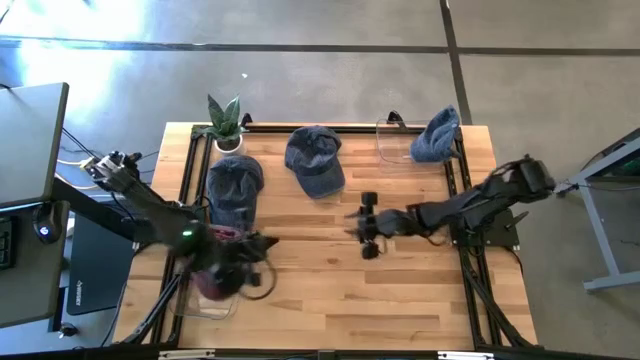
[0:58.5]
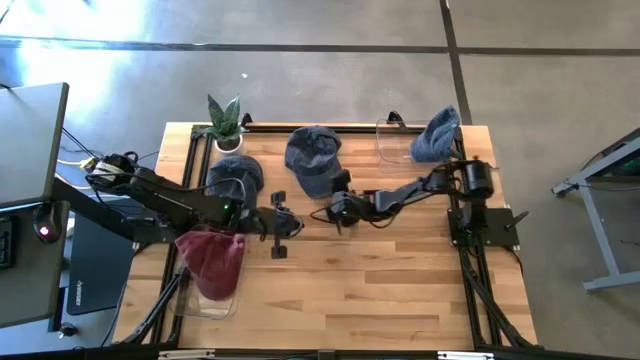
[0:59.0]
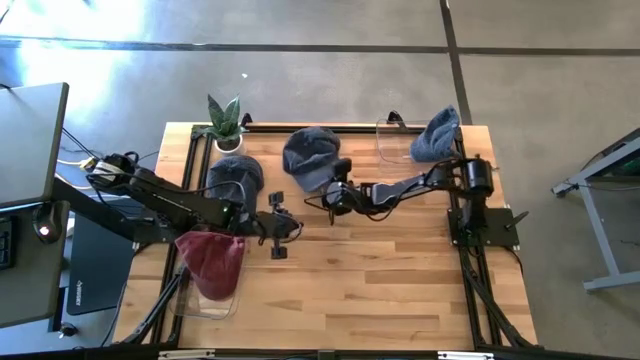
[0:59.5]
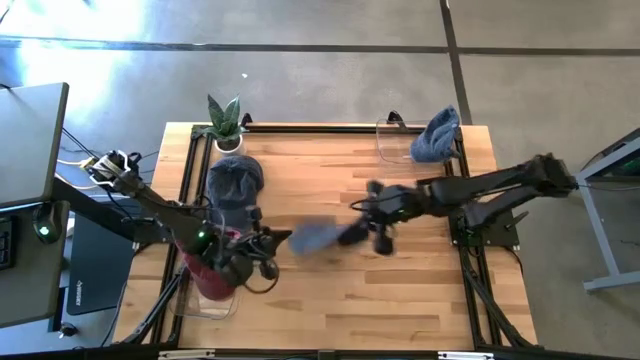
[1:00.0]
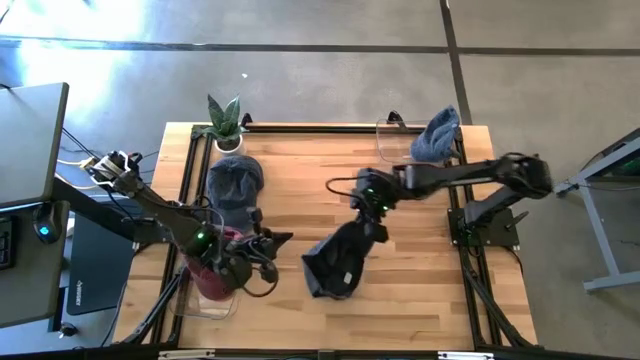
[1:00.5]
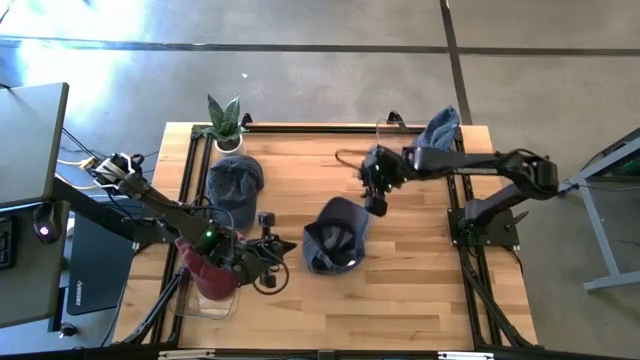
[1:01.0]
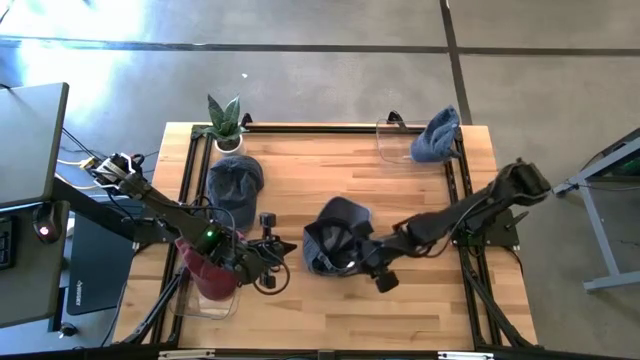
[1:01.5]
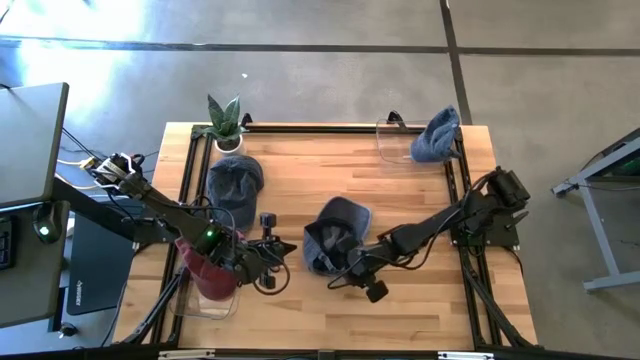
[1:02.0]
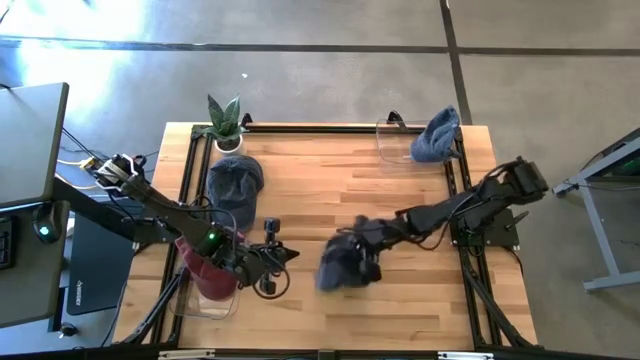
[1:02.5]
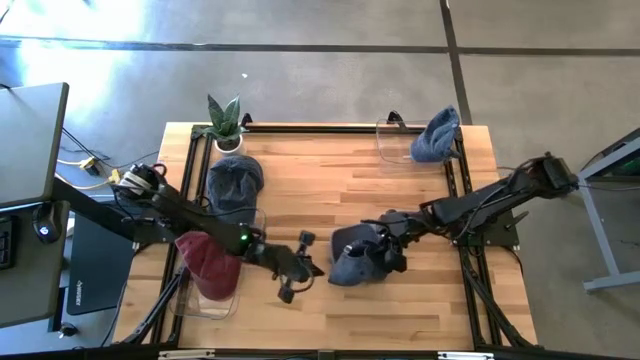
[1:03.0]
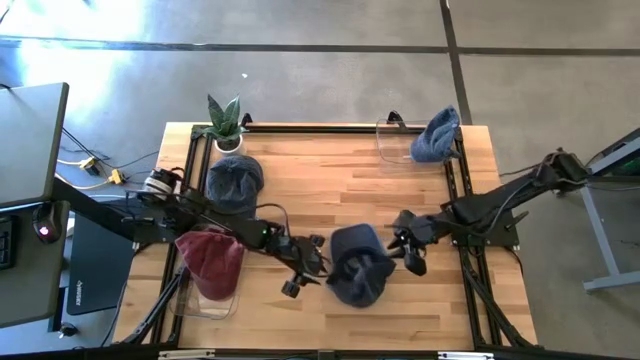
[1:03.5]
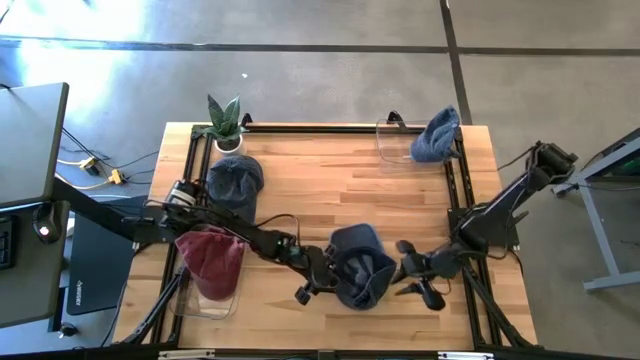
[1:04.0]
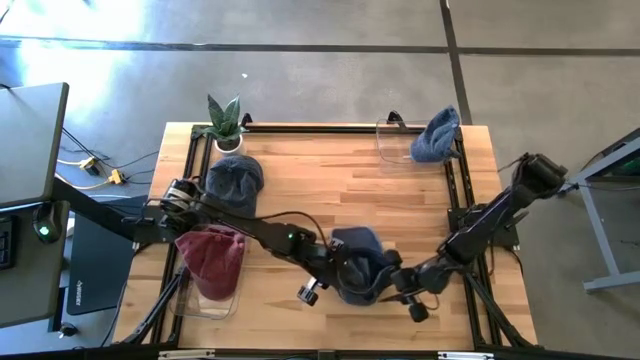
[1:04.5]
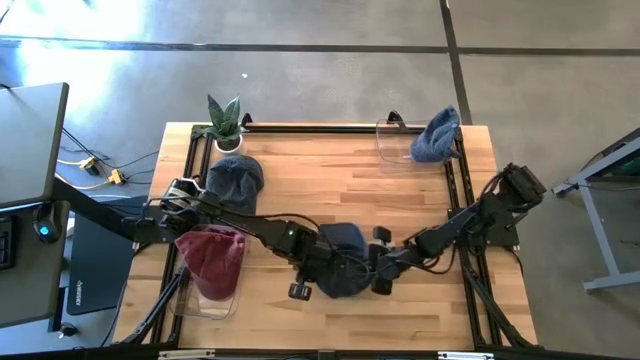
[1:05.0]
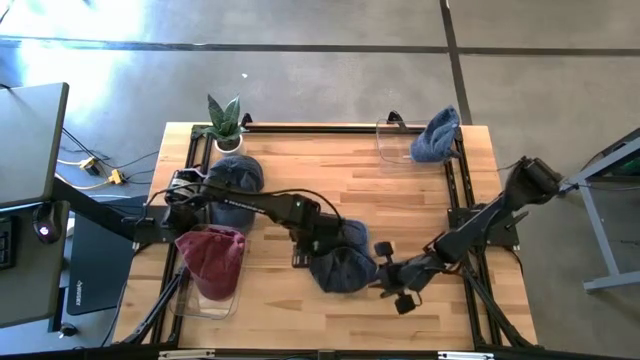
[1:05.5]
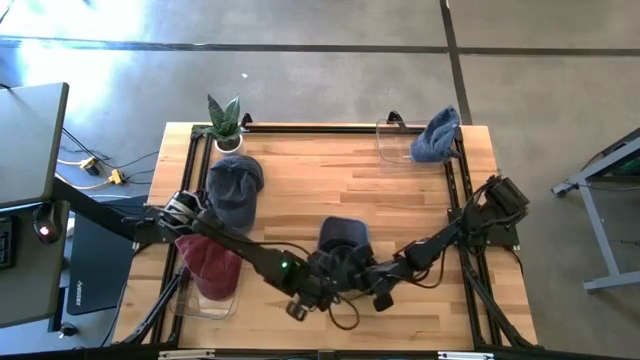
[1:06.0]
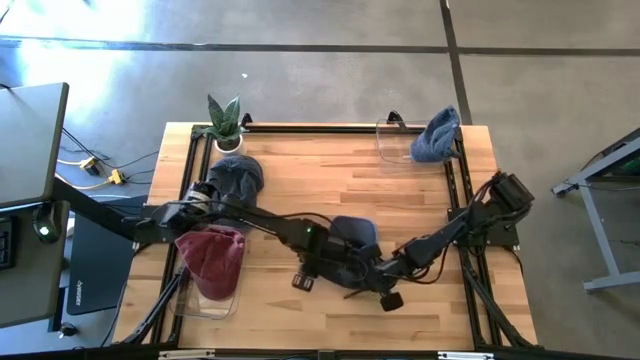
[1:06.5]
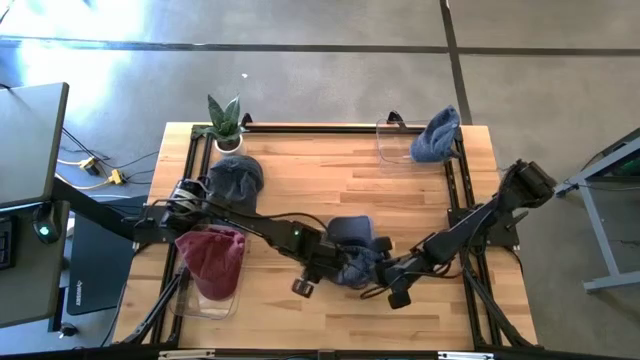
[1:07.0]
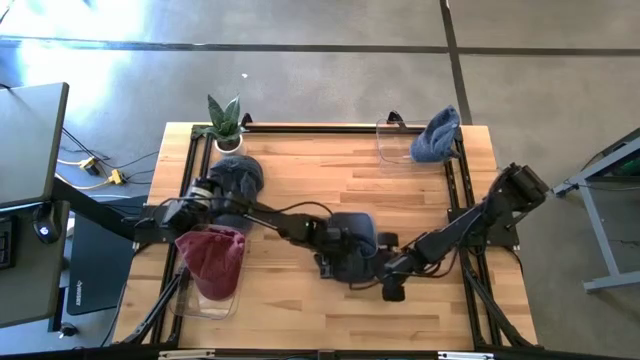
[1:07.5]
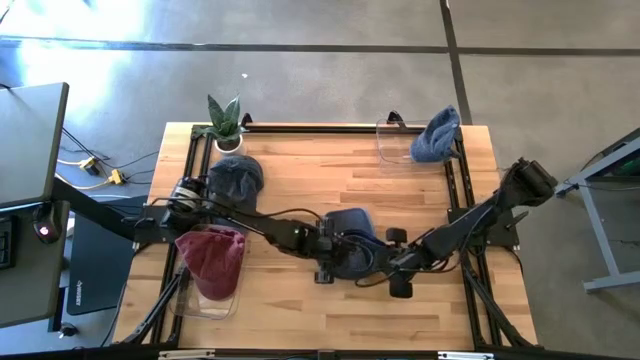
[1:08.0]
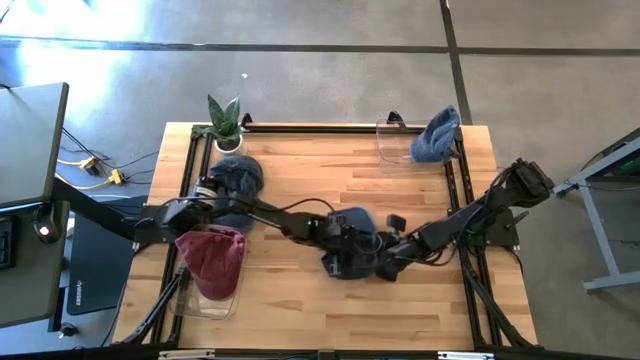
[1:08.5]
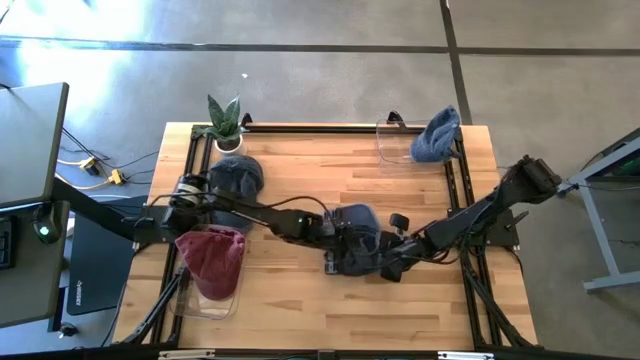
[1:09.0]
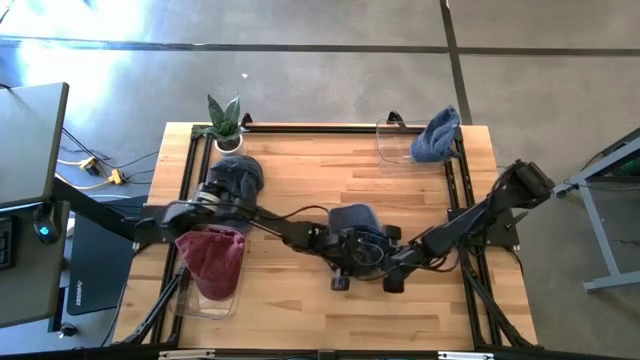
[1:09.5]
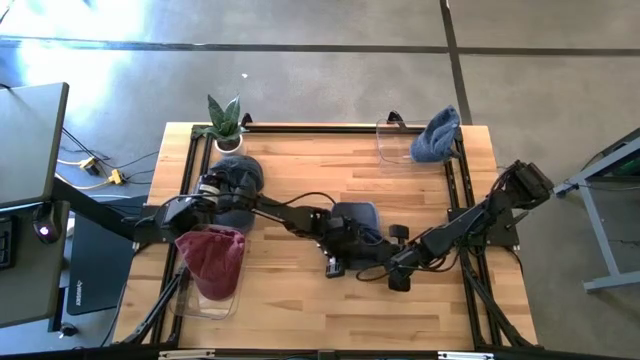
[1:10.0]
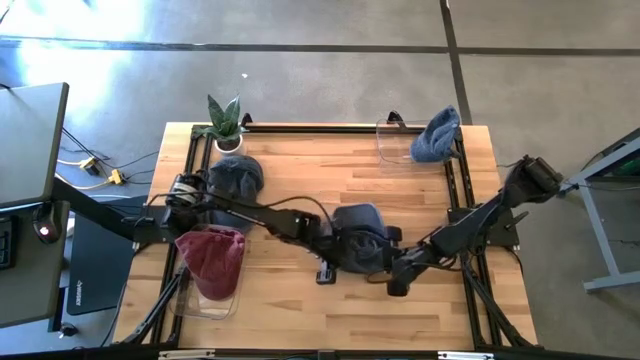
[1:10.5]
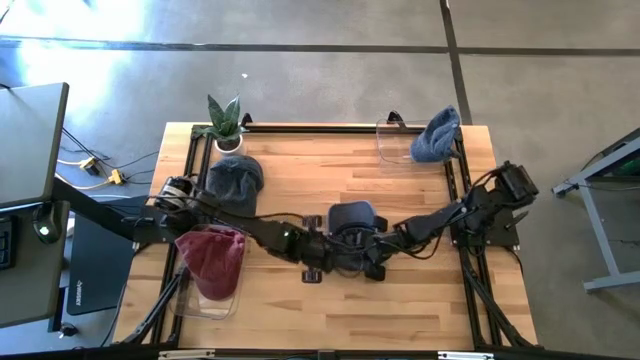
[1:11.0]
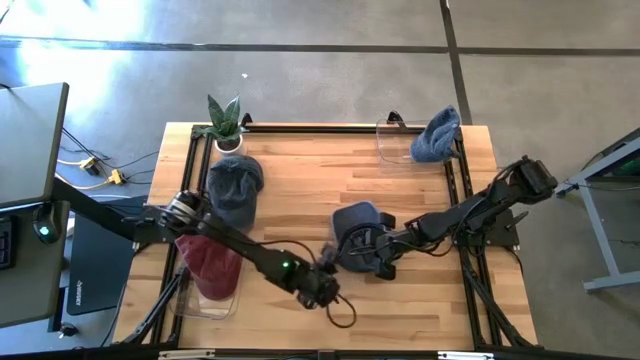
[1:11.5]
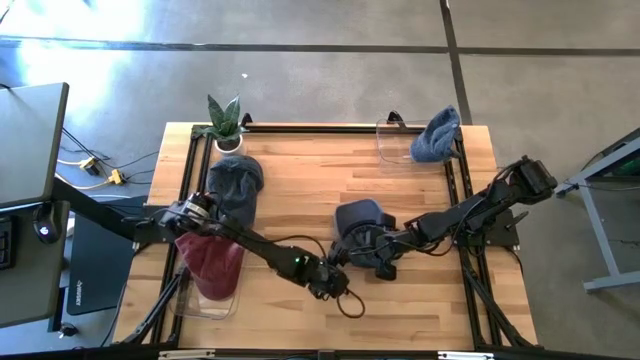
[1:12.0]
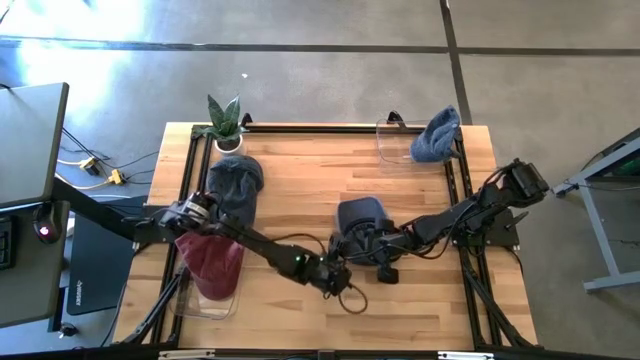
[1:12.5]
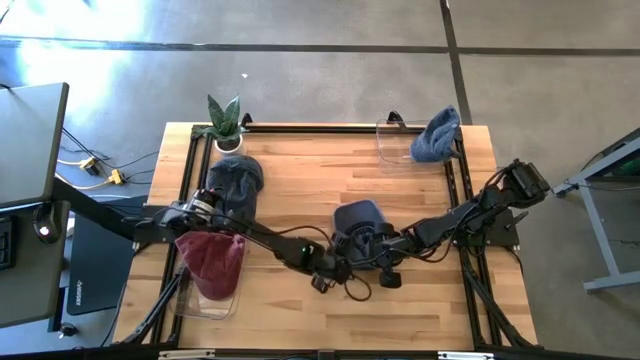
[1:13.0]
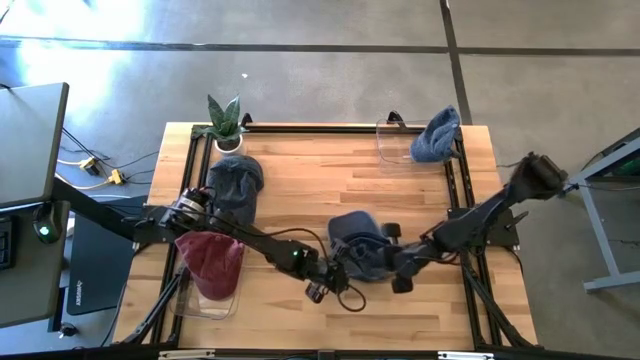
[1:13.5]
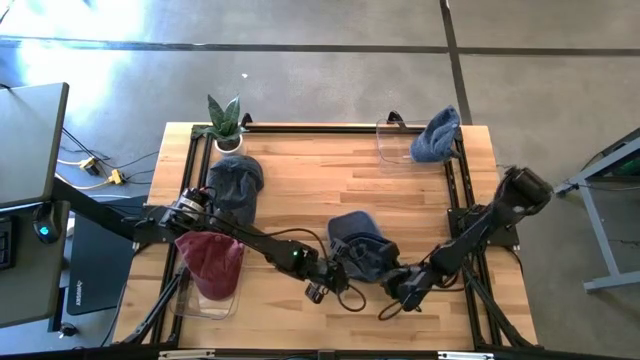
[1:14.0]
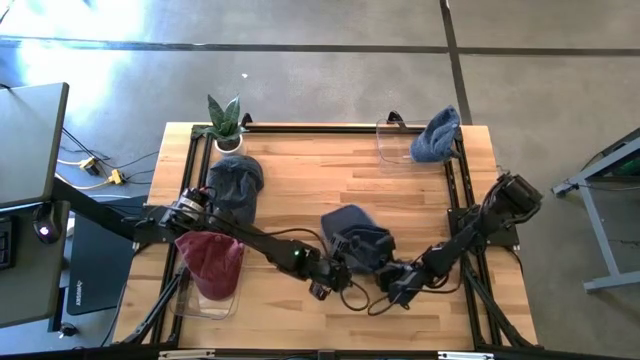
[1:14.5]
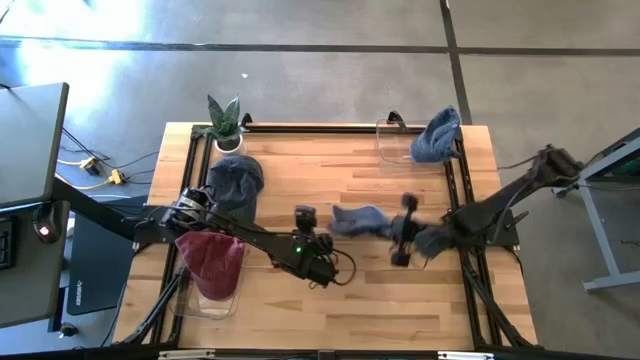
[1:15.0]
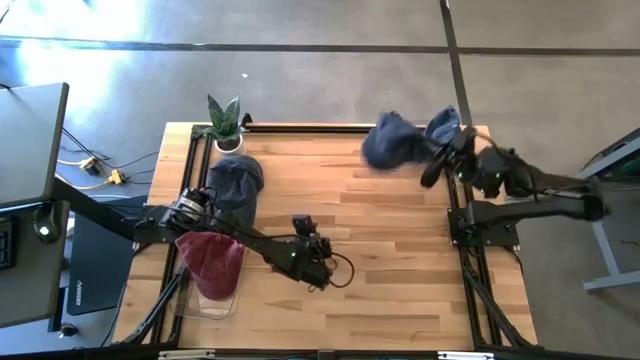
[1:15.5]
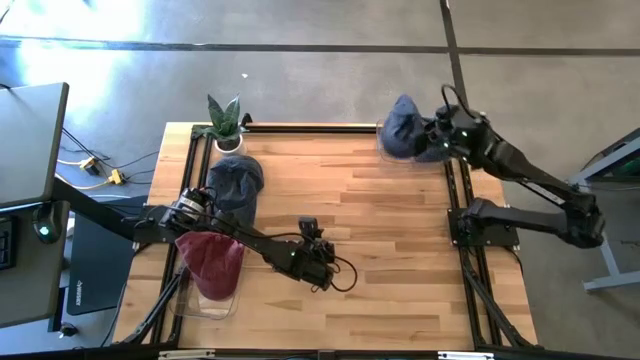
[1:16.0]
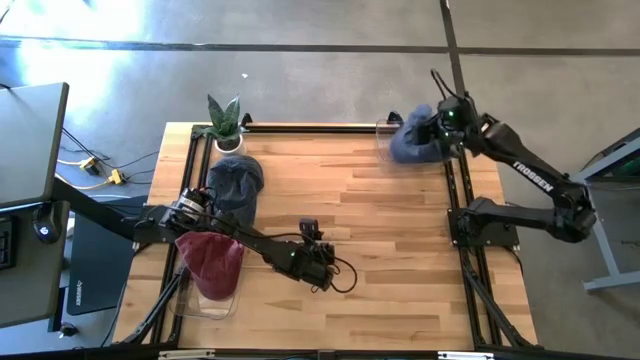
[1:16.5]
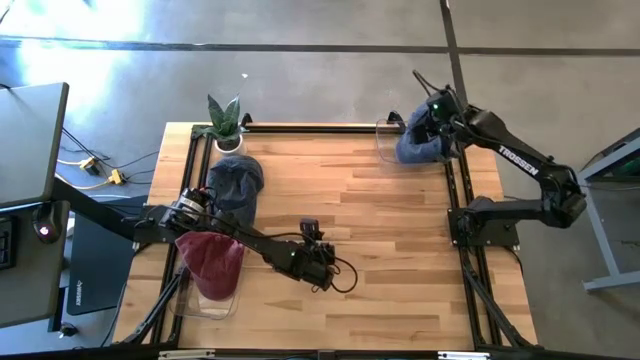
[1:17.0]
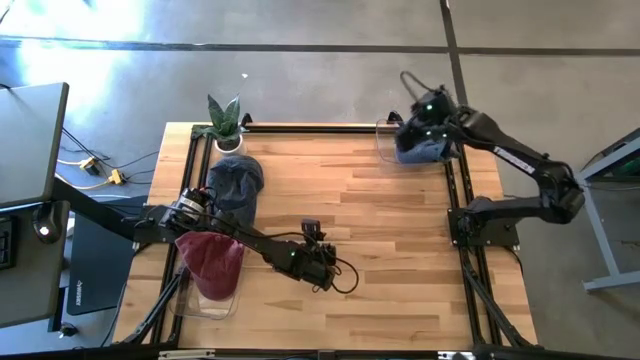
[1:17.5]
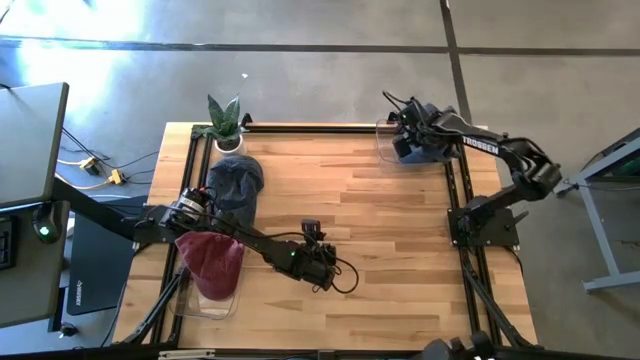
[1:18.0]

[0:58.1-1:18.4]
Task: Pick & Place hat
Put the top dark blue cap into the top transparent bin

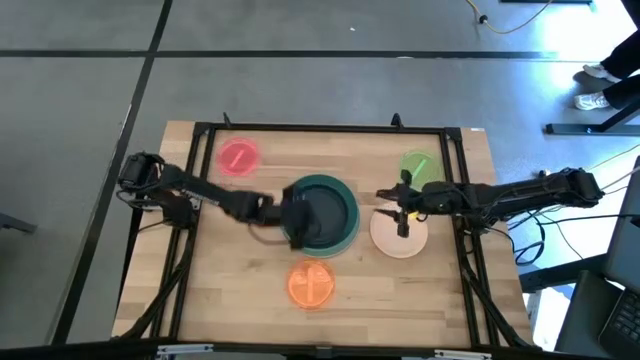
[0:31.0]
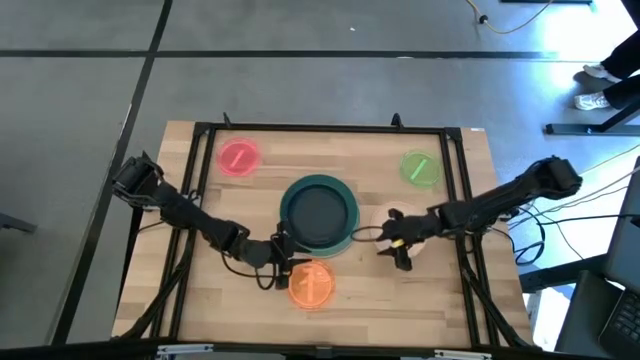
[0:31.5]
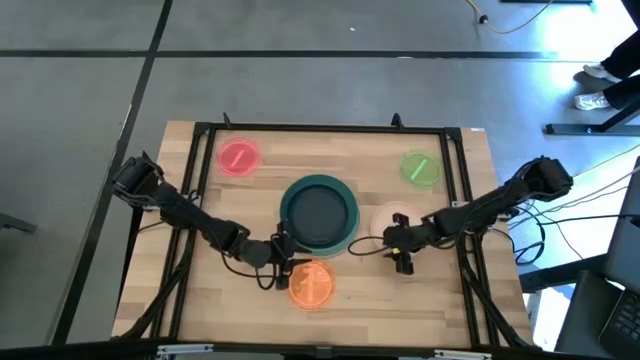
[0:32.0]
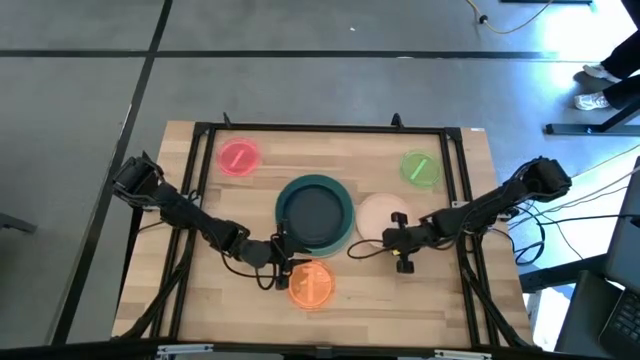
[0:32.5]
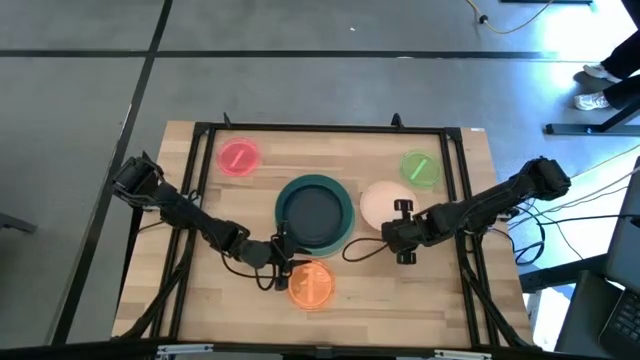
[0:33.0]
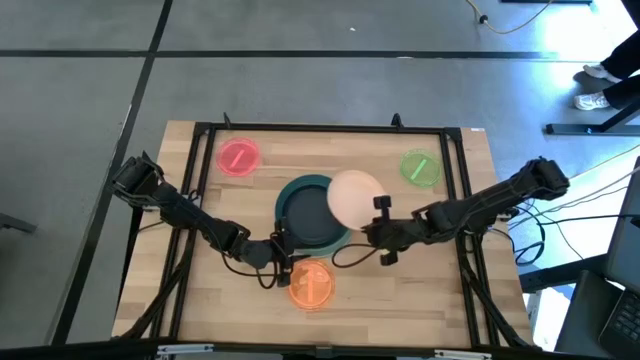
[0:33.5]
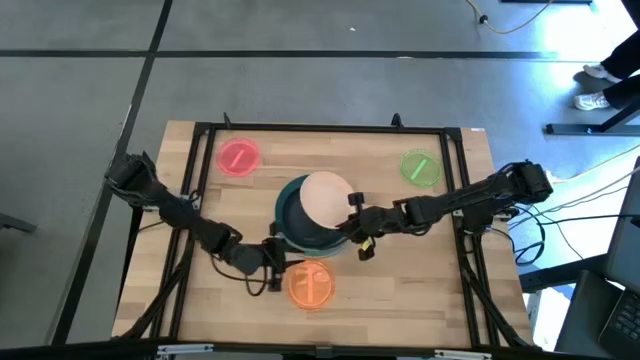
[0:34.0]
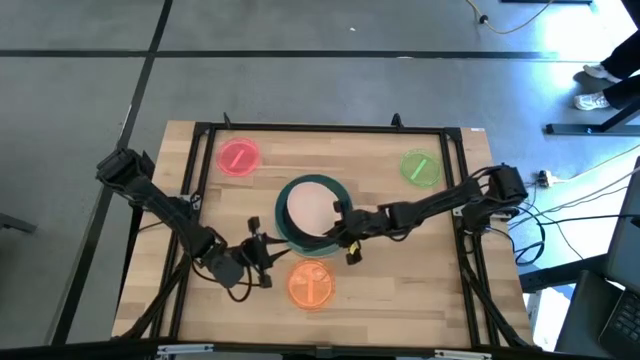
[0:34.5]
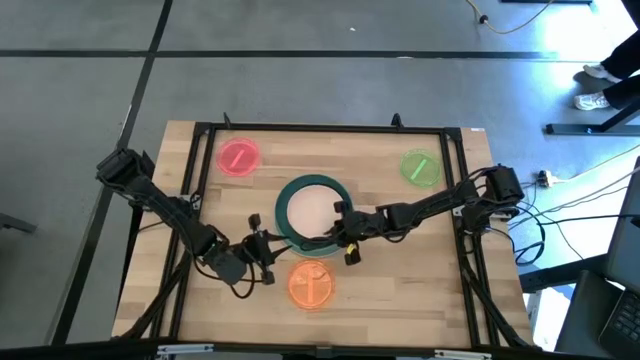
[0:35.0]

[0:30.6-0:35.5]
Task: Stack plastic plates
Stack the white plate on the black plate
